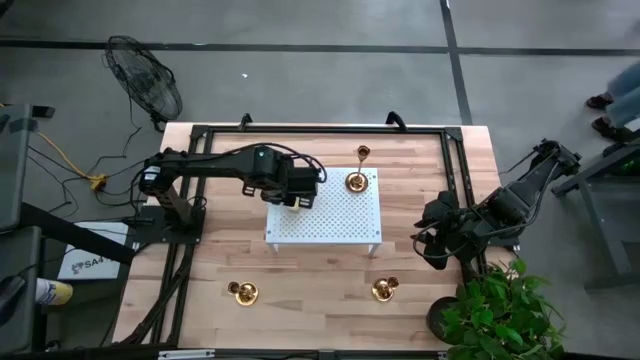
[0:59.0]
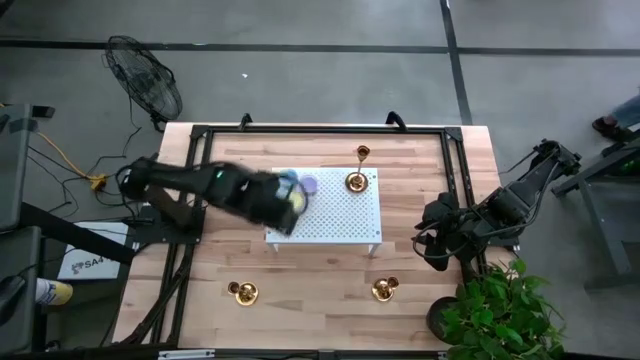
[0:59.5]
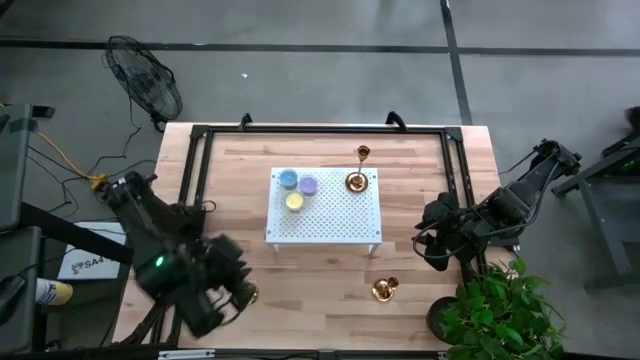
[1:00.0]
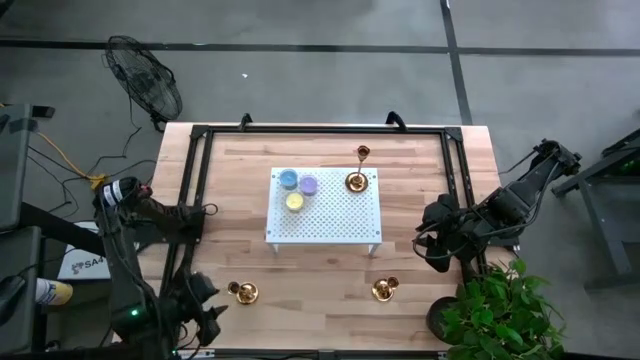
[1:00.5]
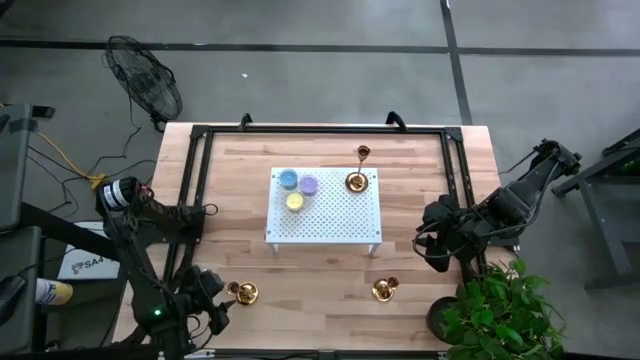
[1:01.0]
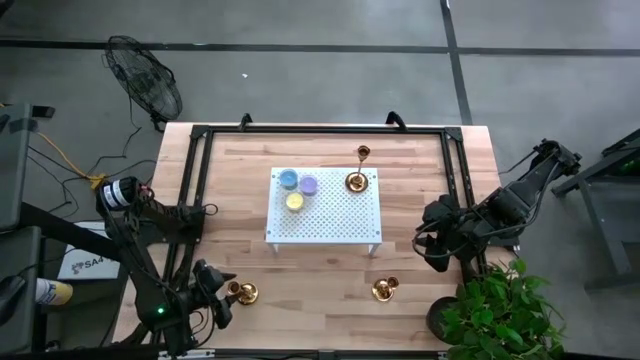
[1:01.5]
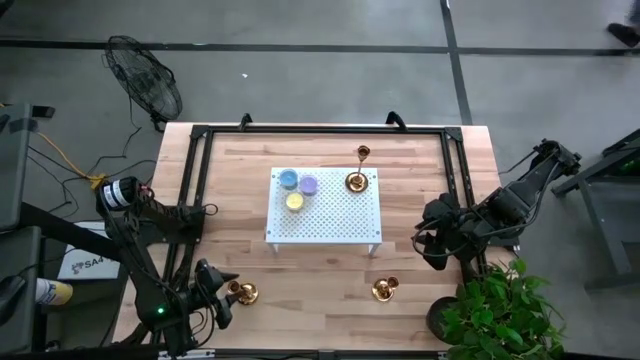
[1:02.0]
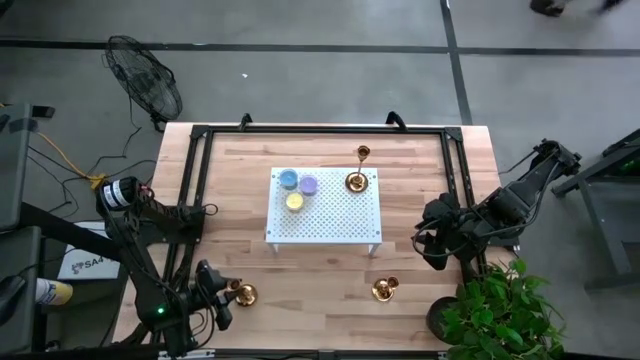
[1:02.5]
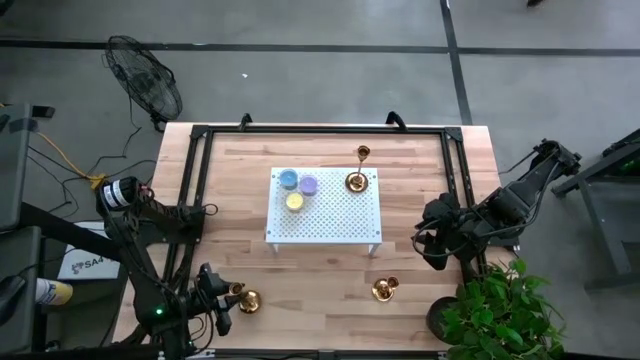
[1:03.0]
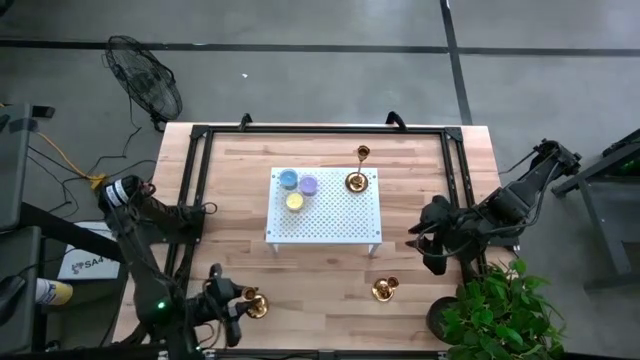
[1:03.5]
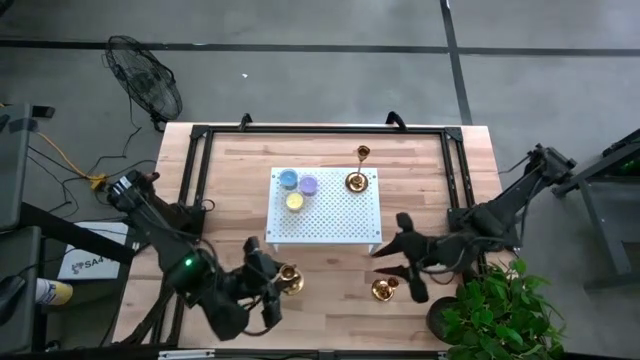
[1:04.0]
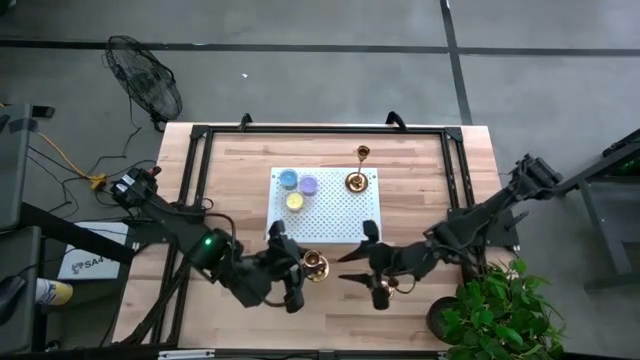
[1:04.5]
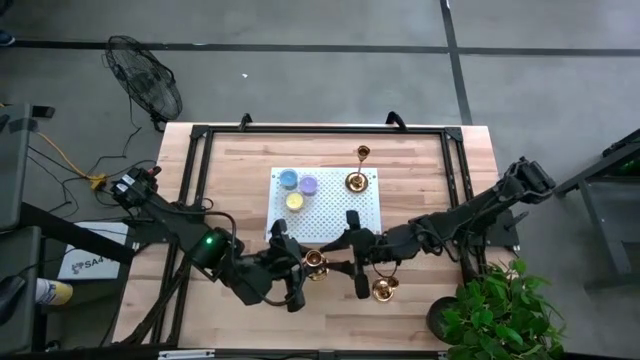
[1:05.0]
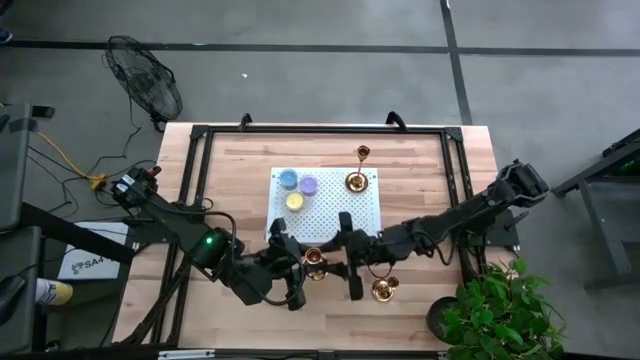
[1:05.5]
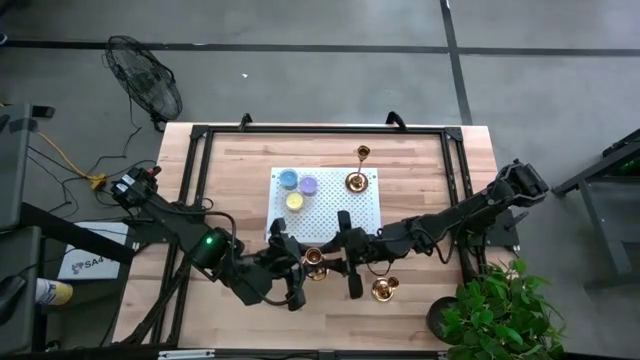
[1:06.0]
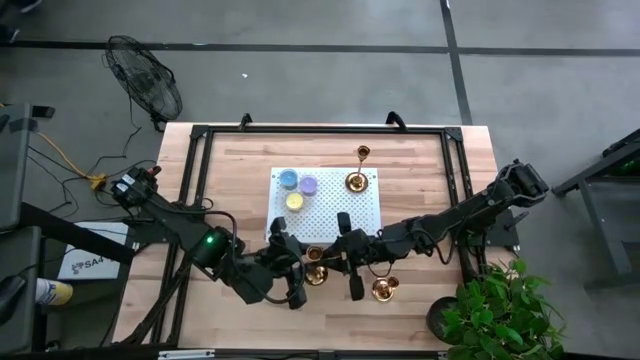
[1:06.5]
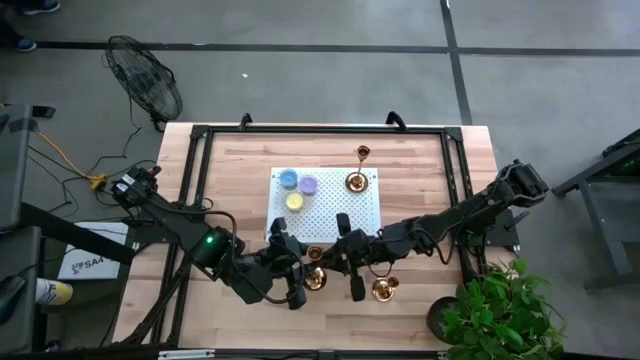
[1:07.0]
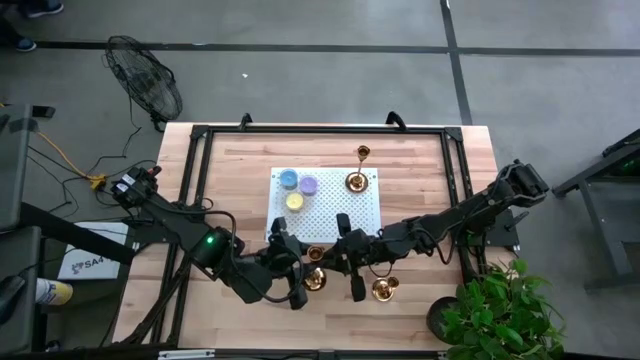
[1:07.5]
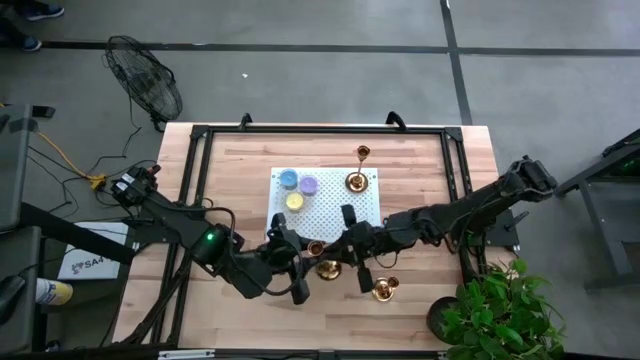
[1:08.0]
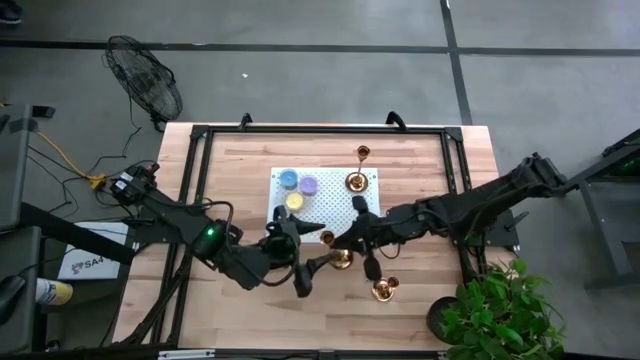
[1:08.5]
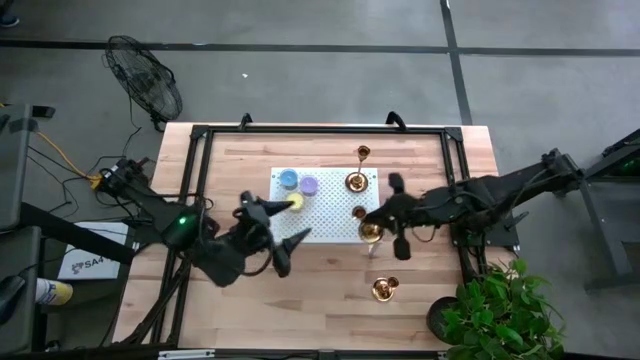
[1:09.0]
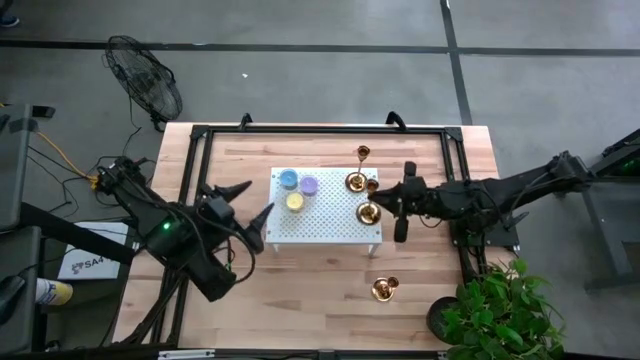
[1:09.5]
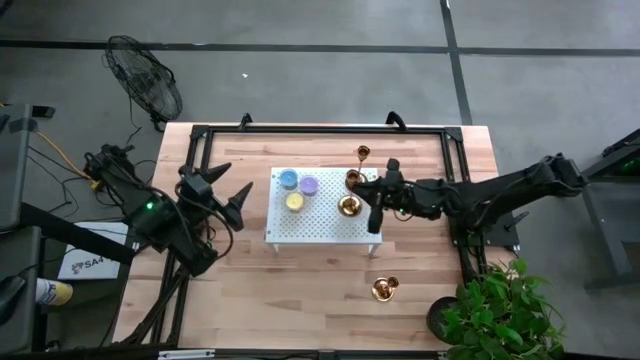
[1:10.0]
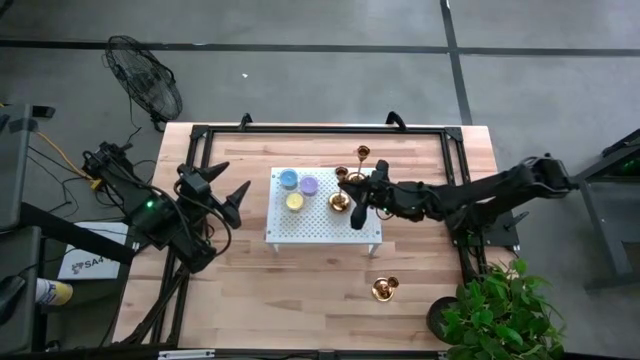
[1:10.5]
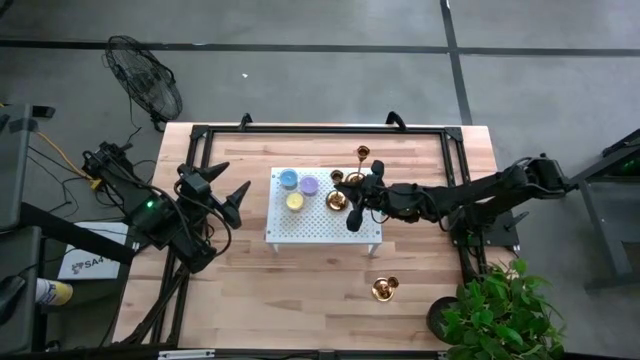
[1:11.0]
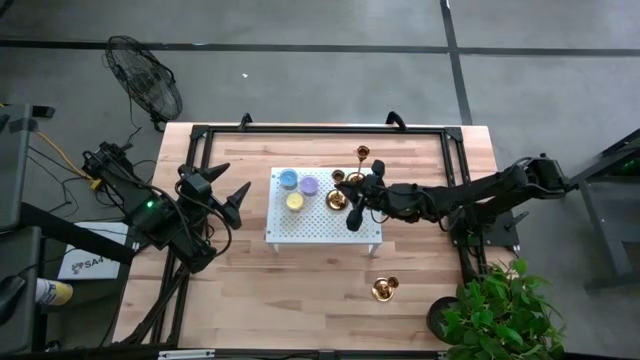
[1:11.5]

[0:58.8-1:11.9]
Task: Pick & Place candle stick holders
Put the left gold candle holder on the shelf

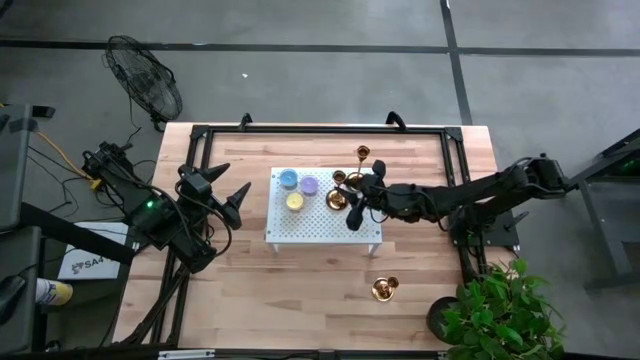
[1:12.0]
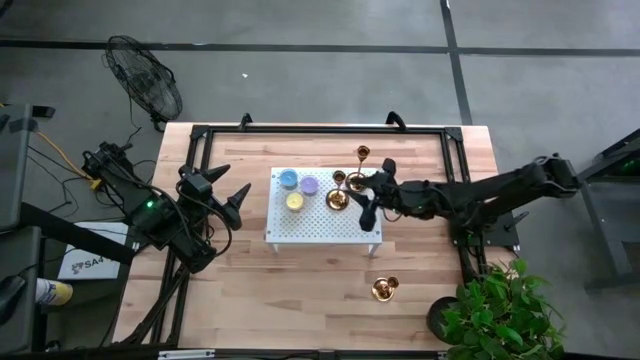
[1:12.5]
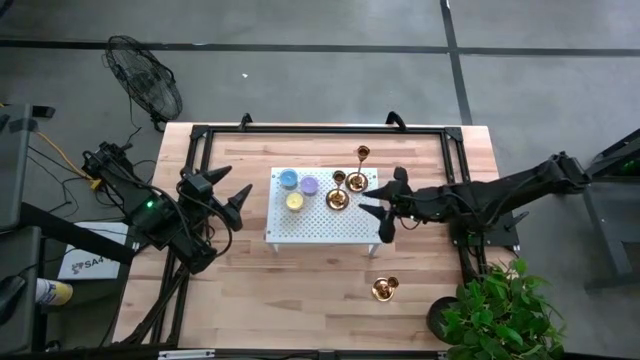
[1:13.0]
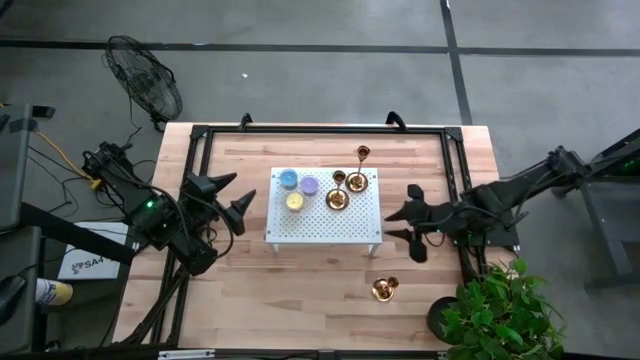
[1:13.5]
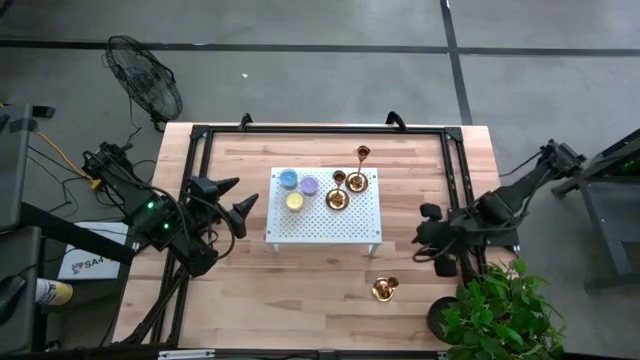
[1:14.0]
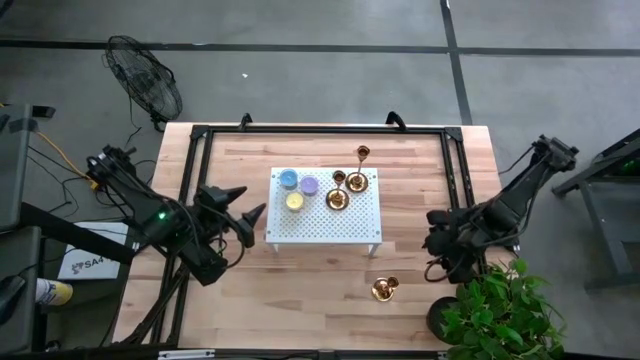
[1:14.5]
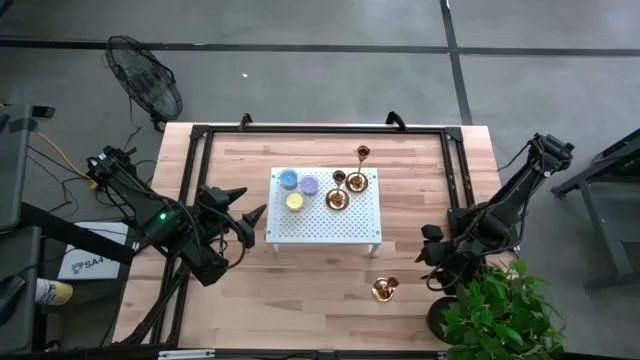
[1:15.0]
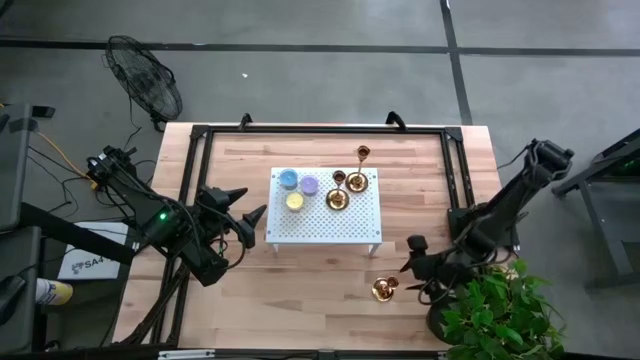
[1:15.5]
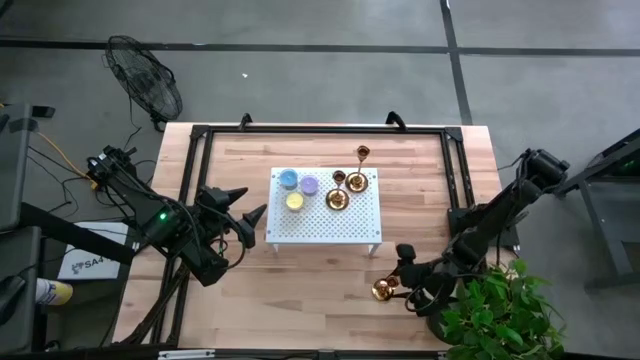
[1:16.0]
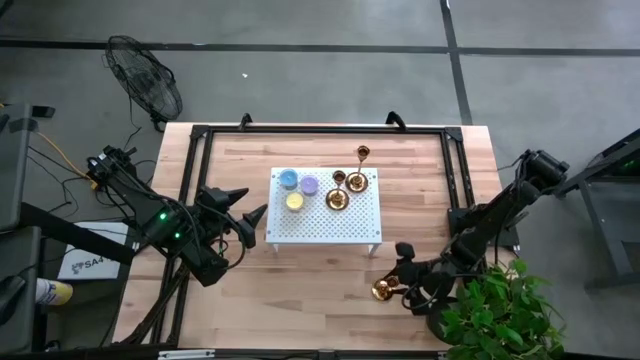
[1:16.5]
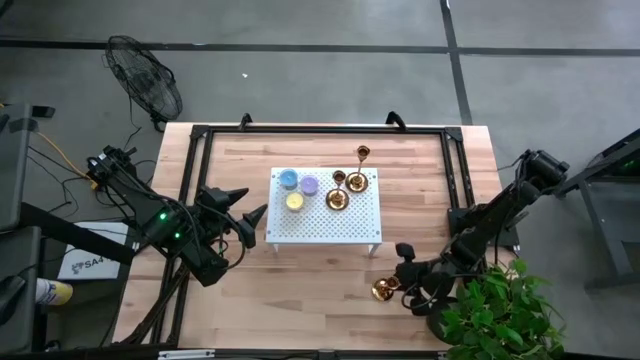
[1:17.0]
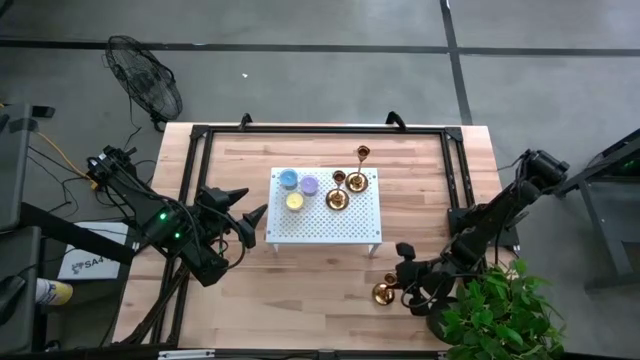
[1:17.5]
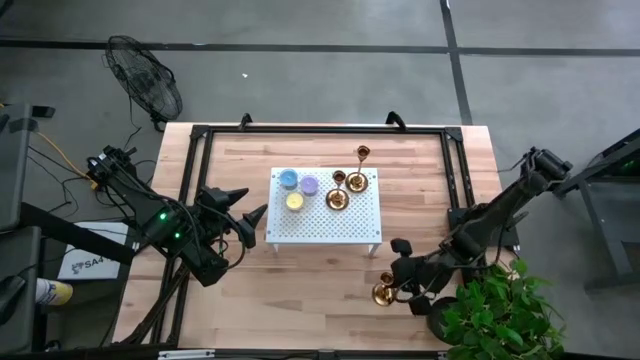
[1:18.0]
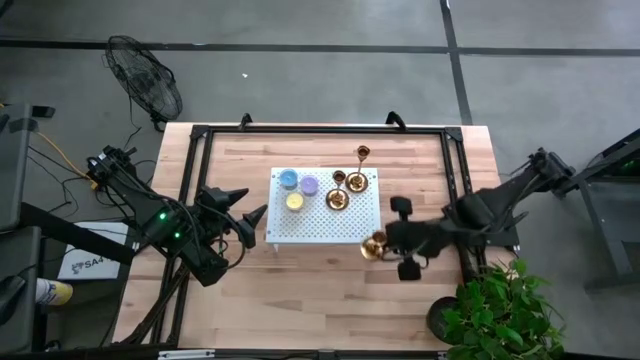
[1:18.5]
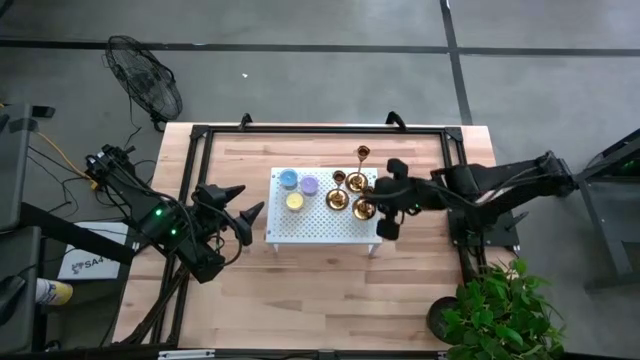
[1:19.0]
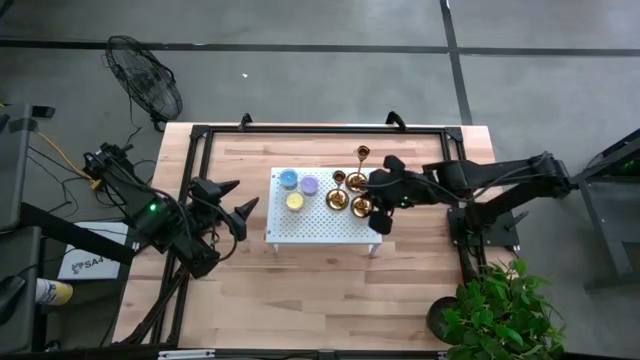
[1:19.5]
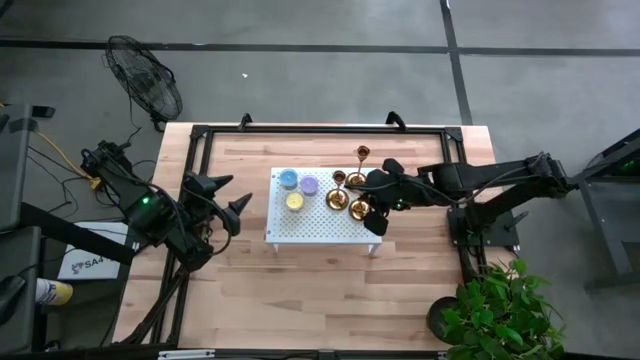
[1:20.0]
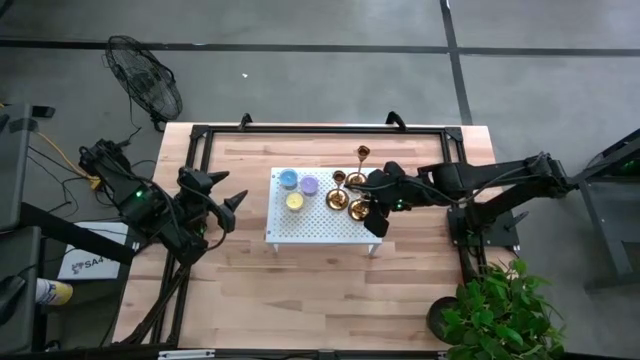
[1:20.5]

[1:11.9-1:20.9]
Put the gold candle holder on the shelf
